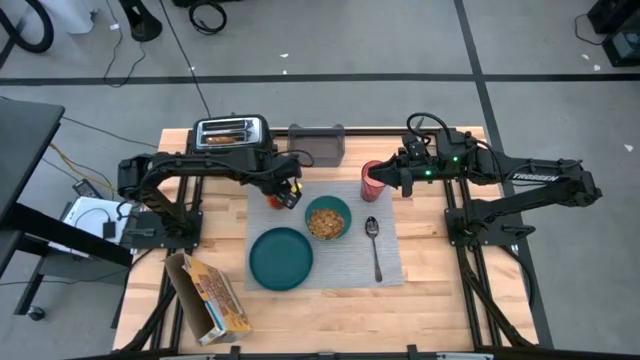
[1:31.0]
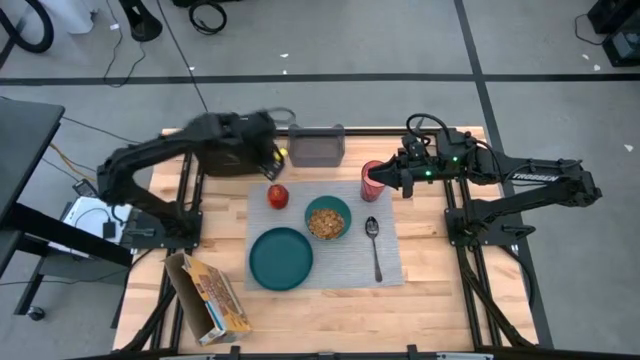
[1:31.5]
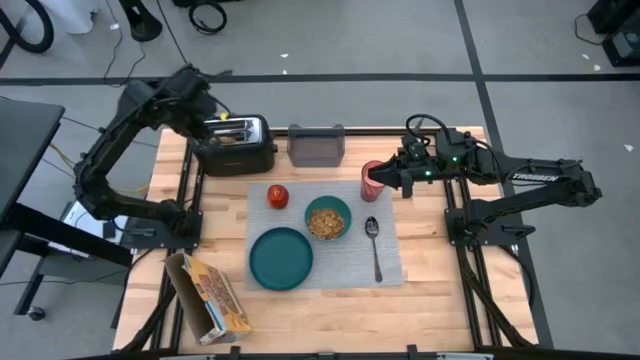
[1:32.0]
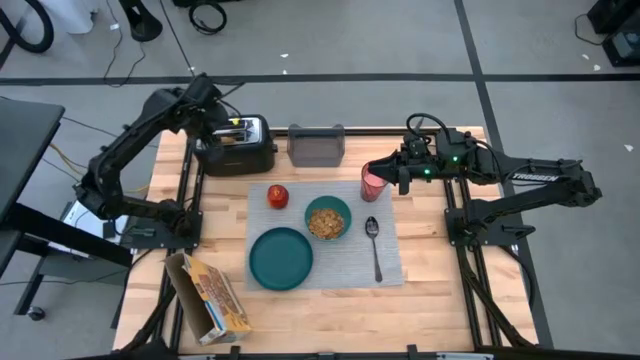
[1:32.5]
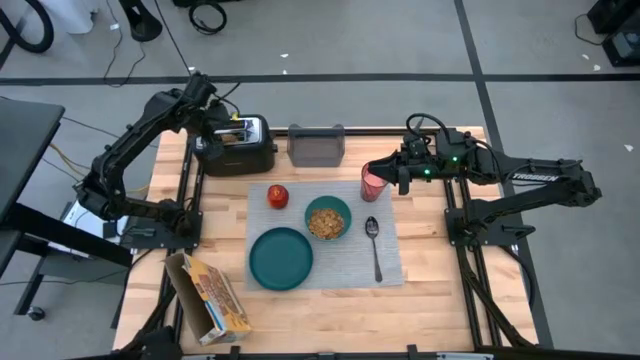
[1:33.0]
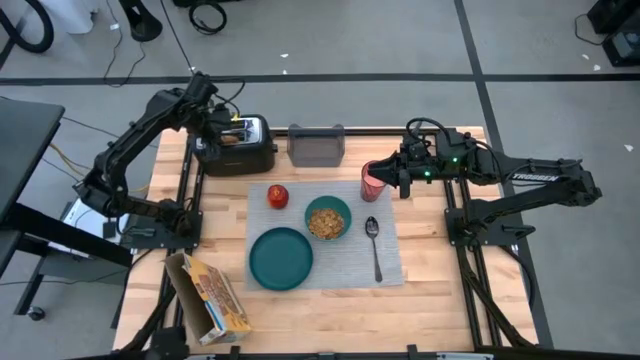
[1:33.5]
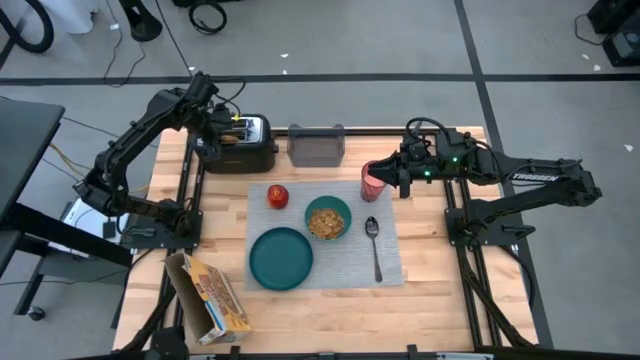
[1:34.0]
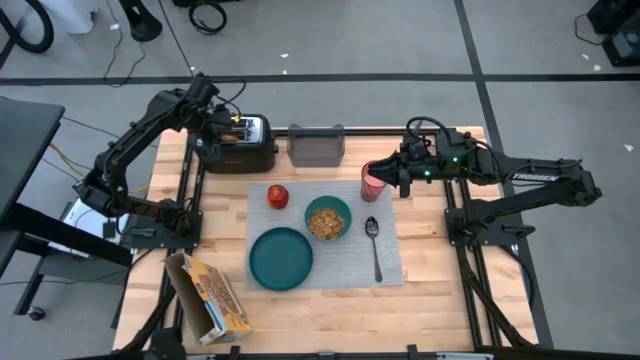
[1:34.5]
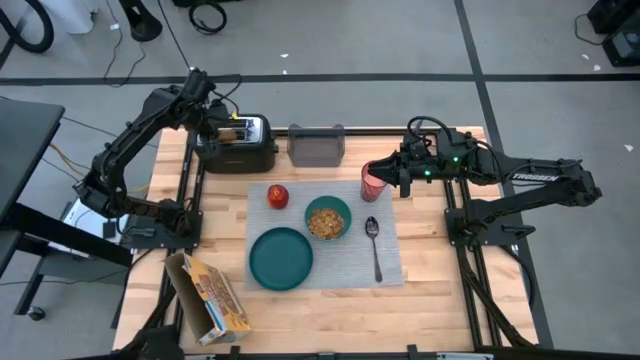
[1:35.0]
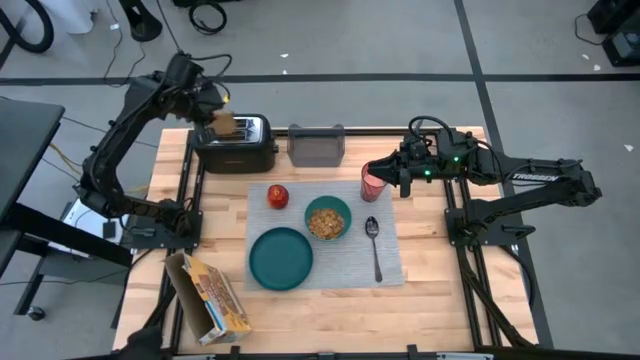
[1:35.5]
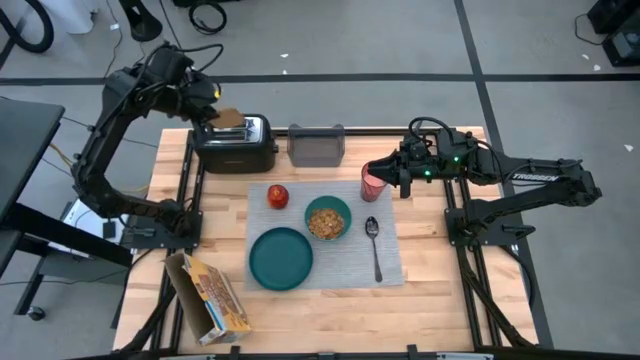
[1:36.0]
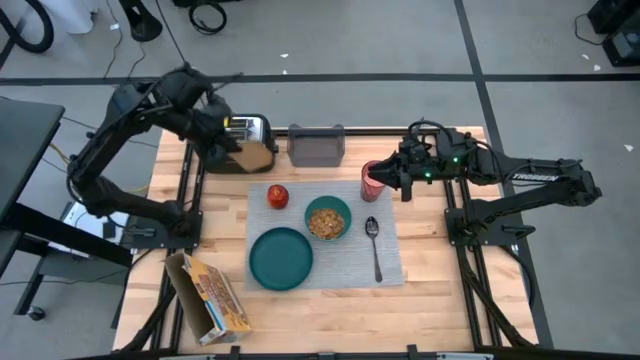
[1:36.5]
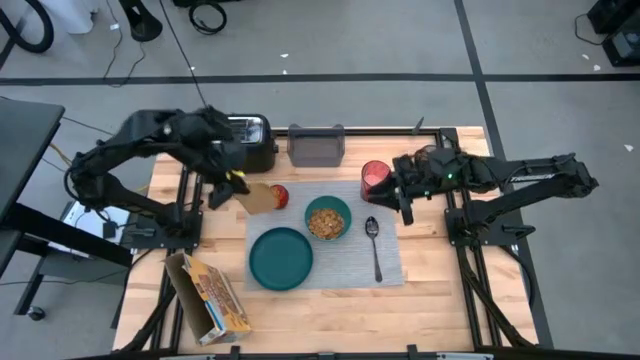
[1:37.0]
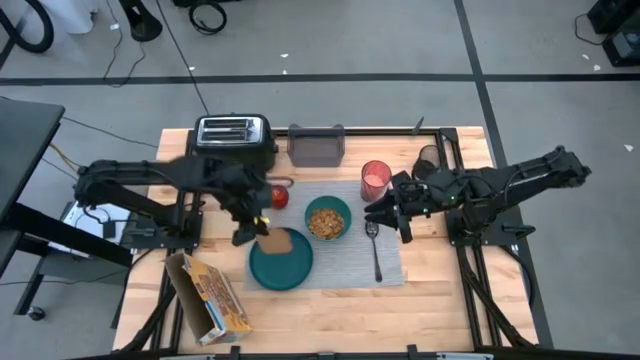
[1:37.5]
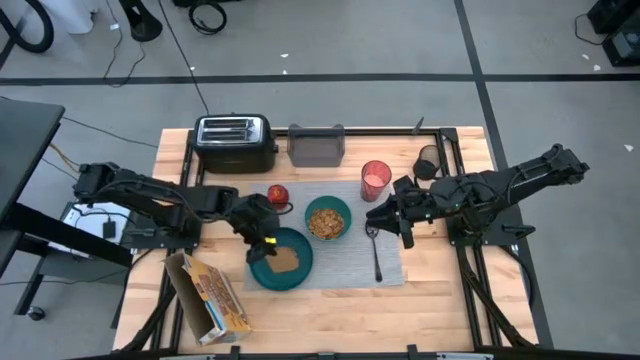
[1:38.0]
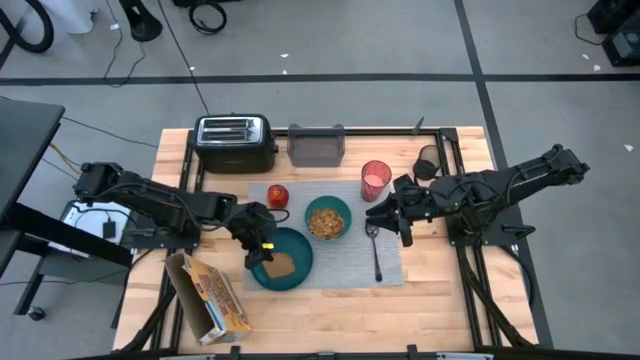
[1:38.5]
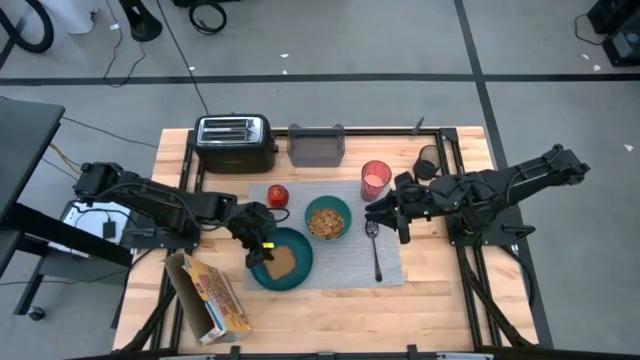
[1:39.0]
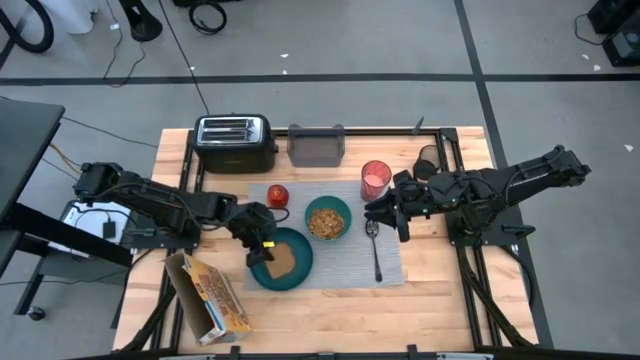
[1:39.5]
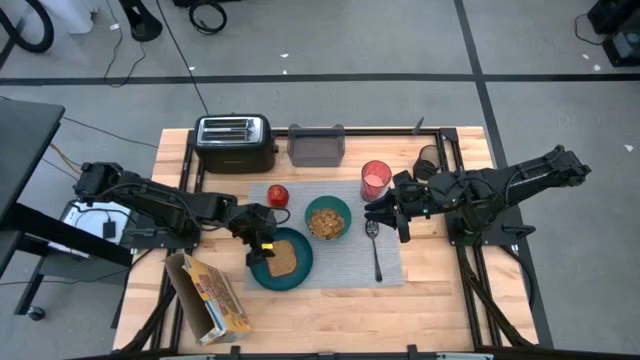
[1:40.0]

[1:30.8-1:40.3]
Task: Arrange a breakfast setting
Put the toasted bread on the blue plate

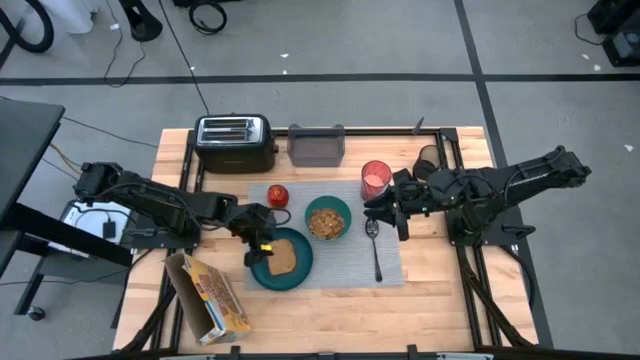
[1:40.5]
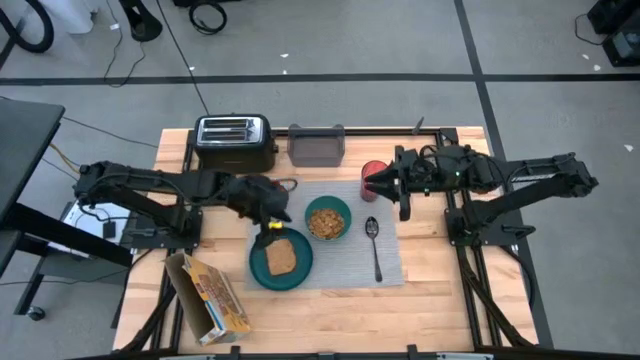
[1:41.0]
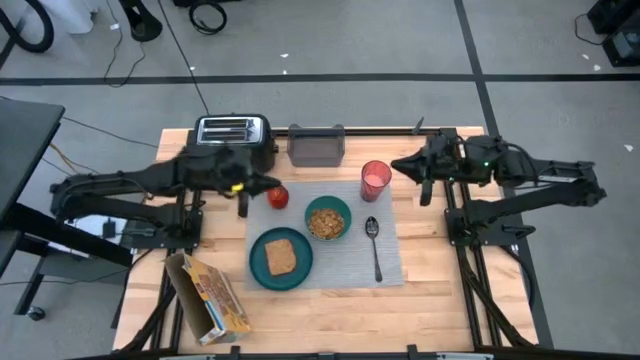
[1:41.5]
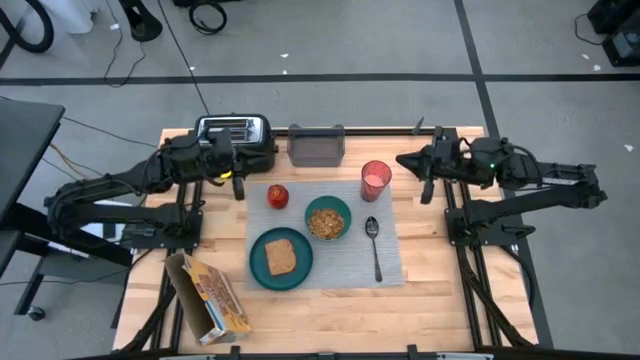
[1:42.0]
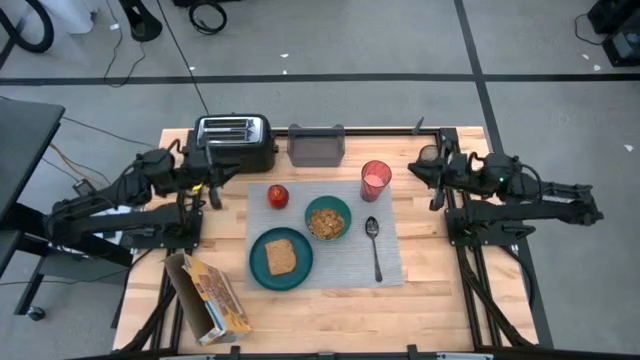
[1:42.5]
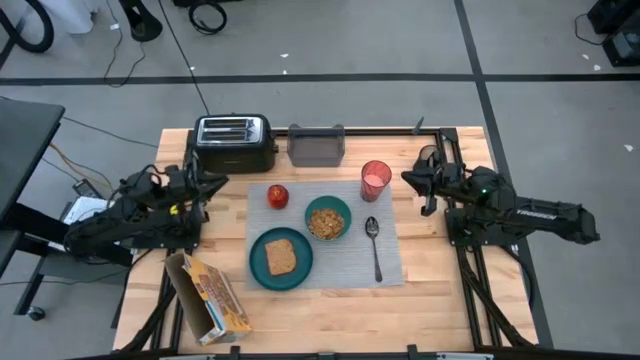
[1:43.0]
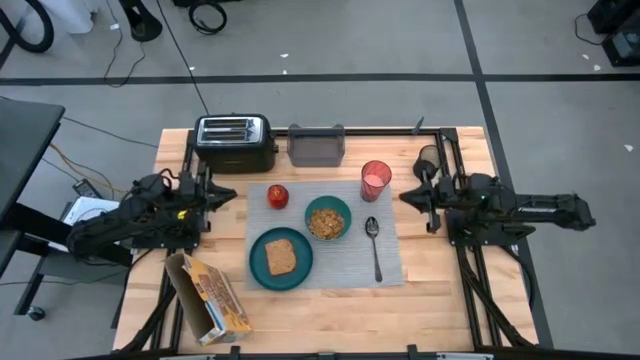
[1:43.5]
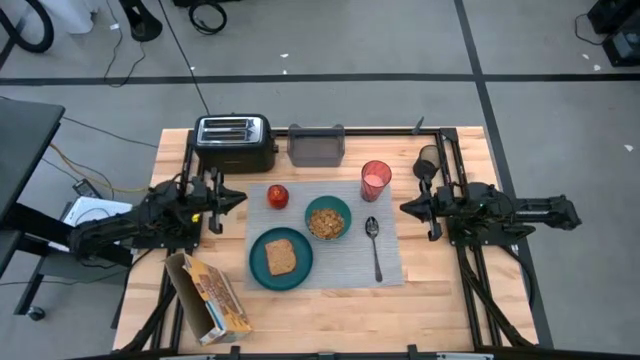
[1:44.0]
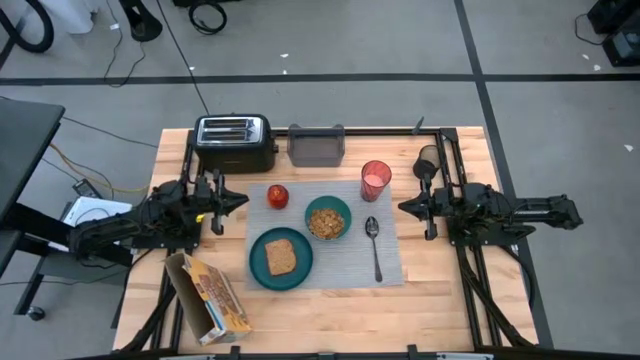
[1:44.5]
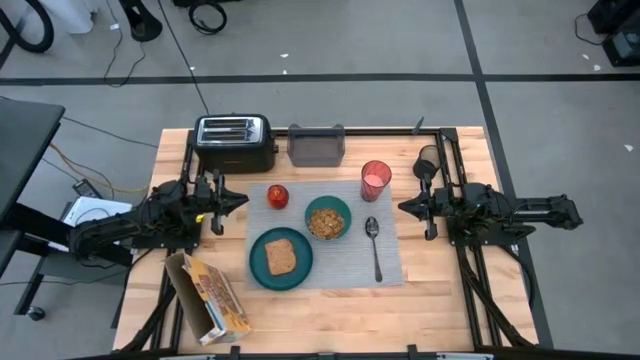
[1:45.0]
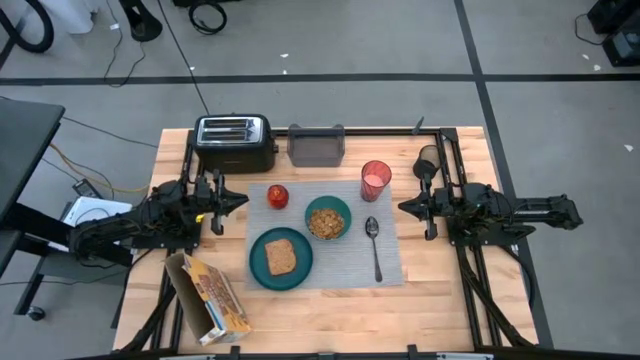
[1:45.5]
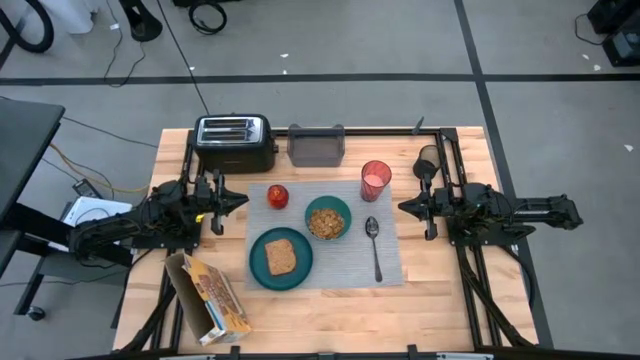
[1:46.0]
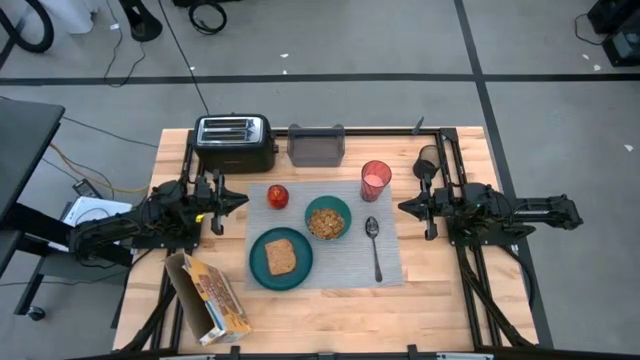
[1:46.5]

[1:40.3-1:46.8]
Return to Home Position

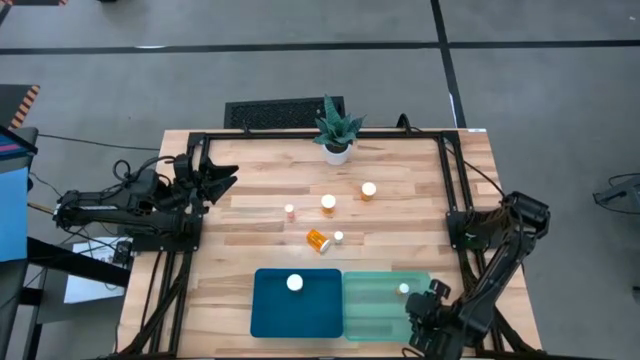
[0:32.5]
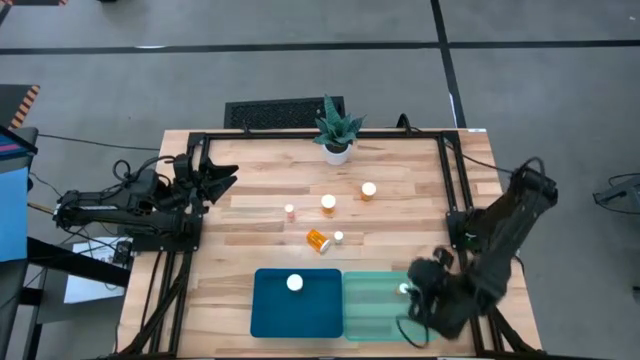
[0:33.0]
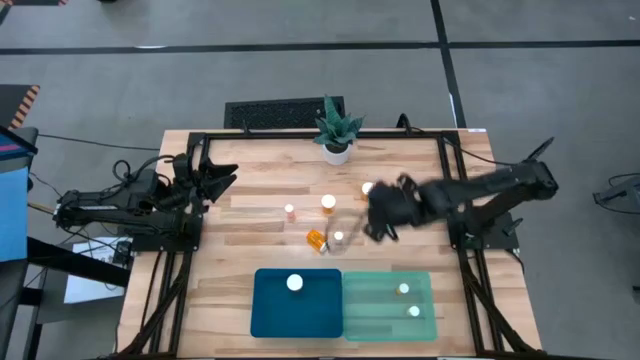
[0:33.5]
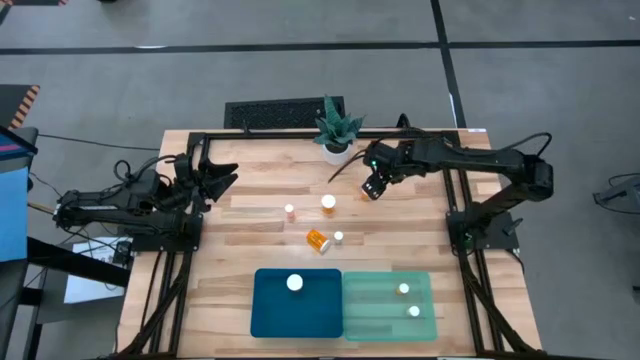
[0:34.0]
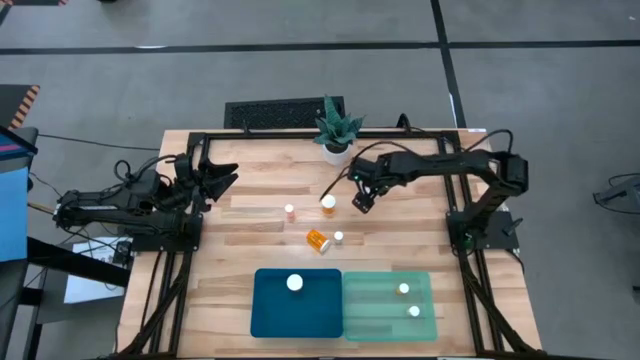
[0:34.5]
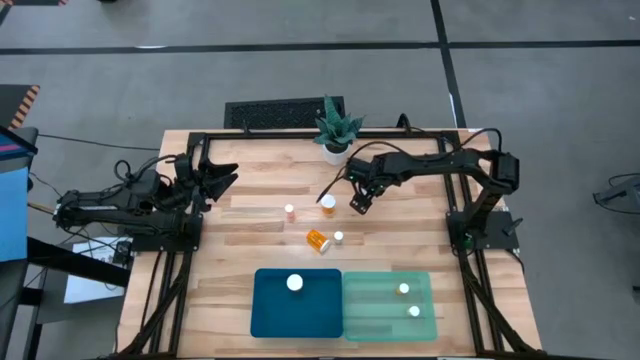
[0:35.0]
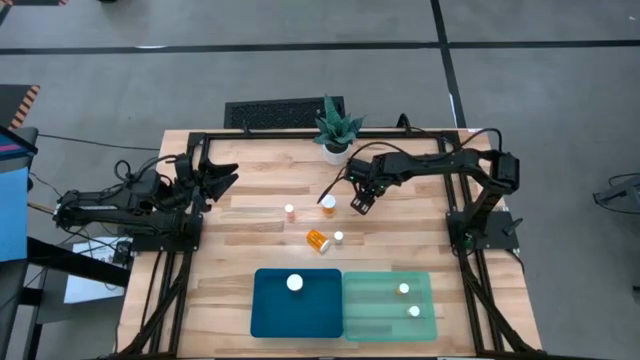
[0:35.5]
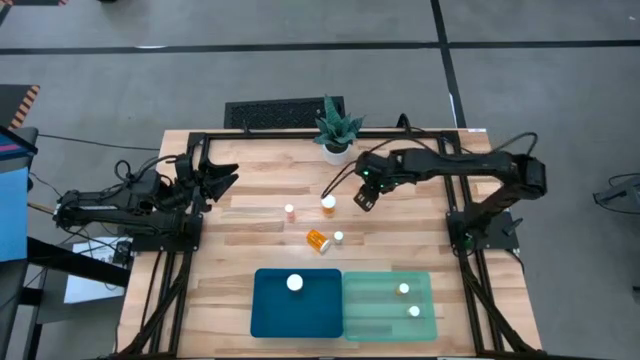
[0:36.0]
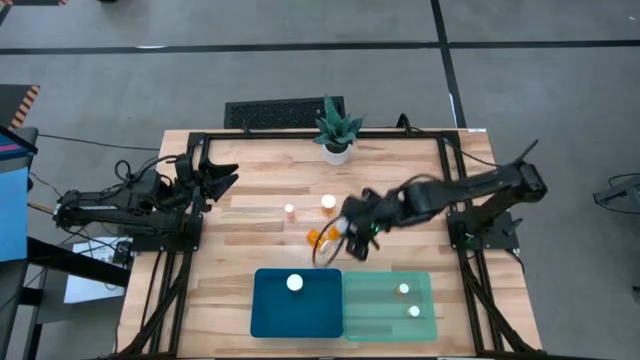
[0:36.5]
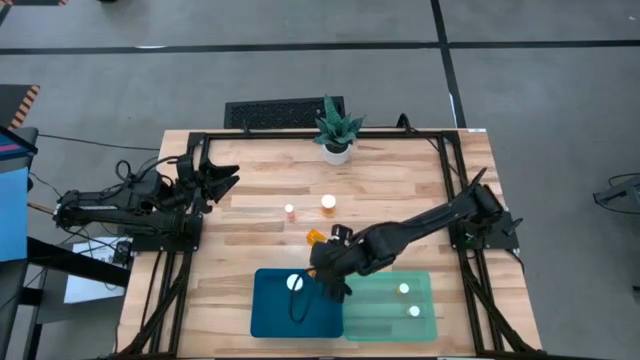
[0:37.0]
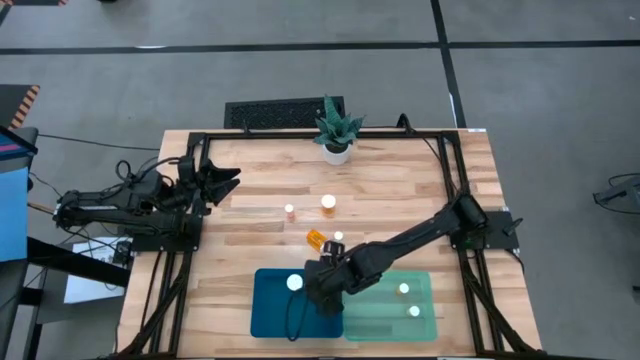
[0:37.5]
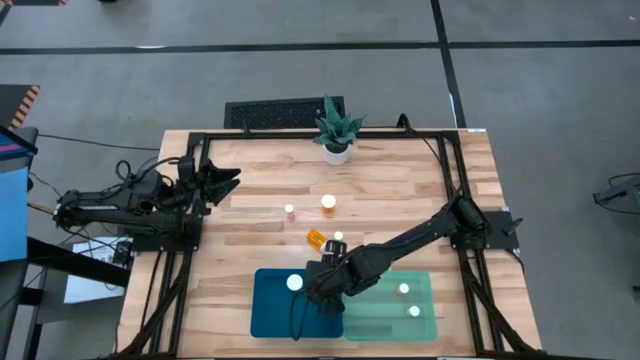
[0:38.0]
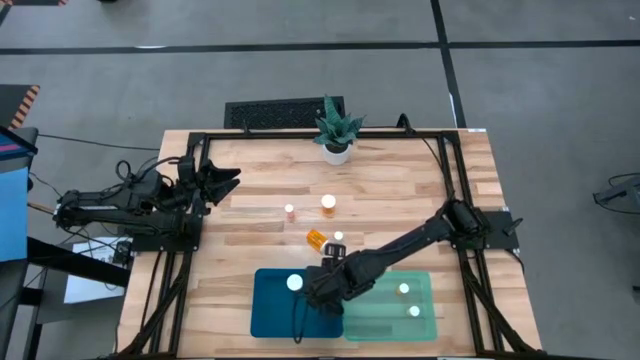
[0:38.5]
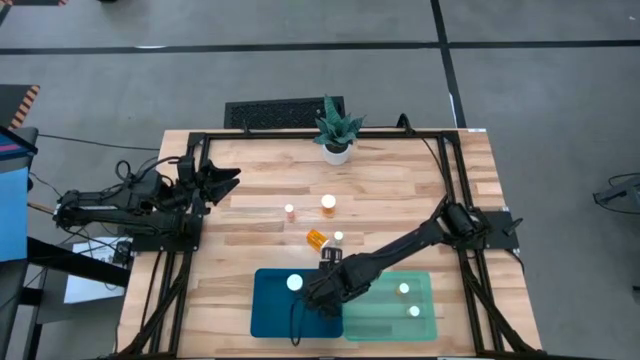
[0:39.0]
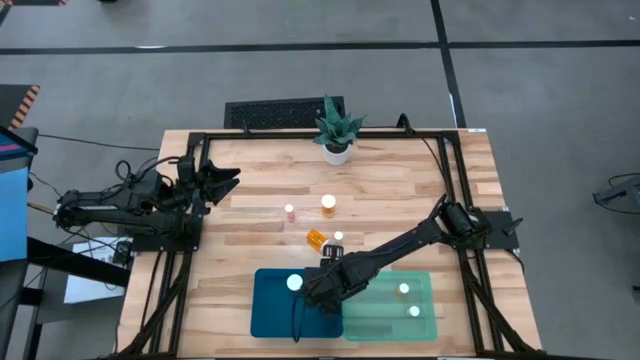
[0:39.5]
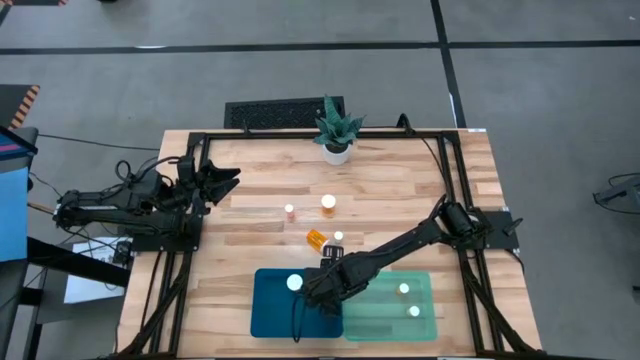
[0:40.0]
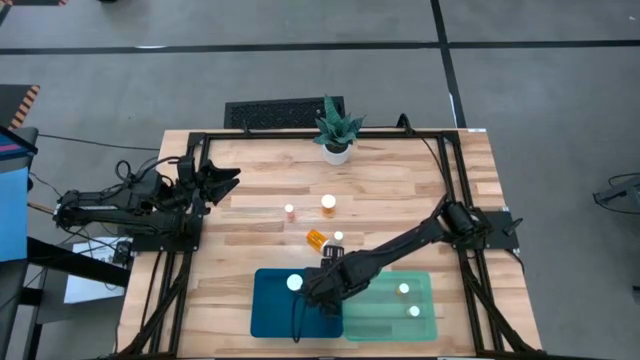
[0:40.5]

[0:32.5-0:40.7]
Task: Pick and place medicine bottles into bin by pill shape (circle, oval)
Put the large orange pill bottle into the blue bin
